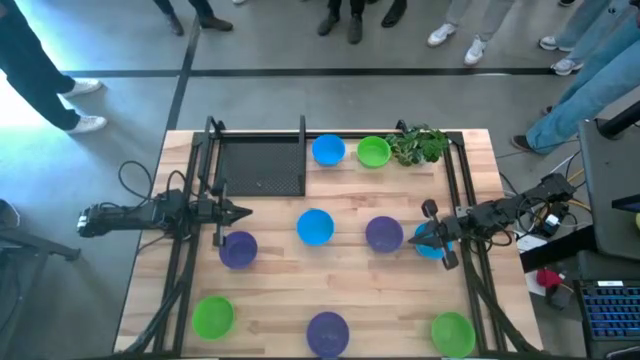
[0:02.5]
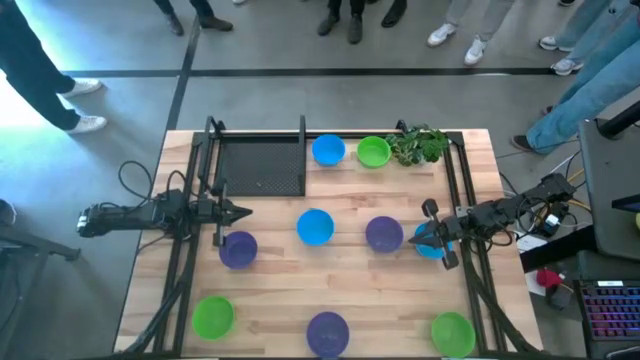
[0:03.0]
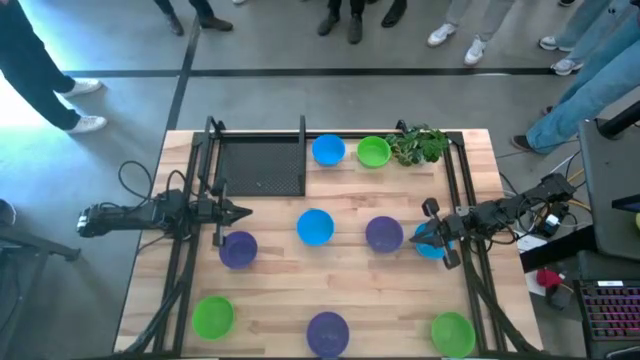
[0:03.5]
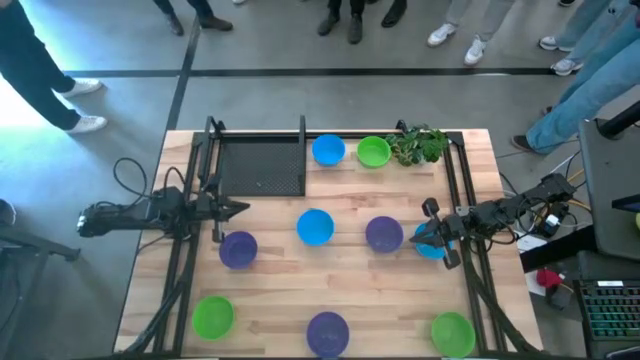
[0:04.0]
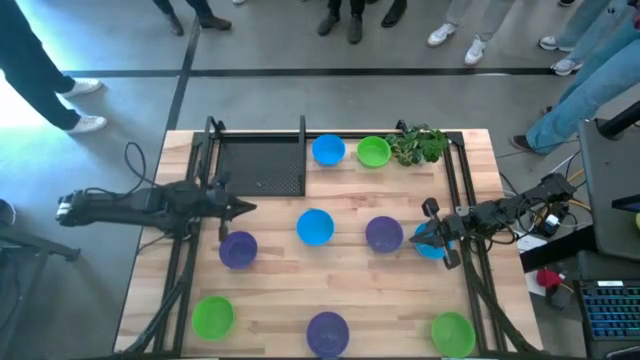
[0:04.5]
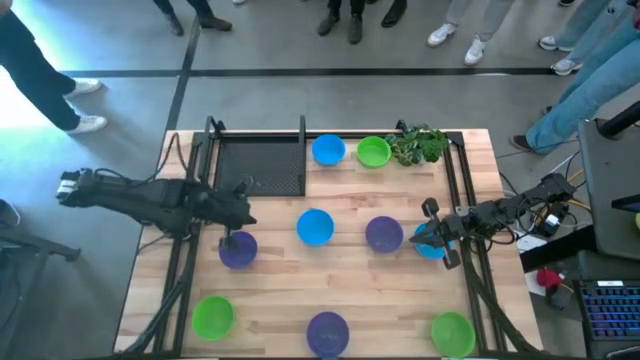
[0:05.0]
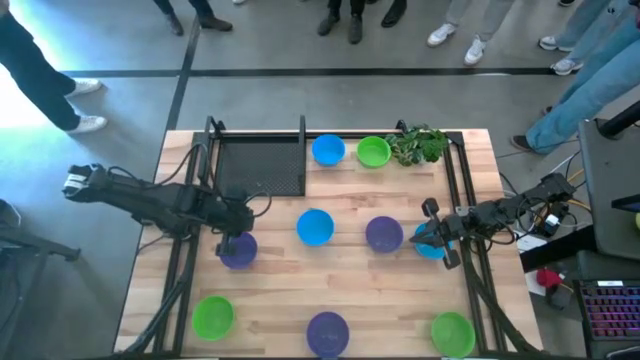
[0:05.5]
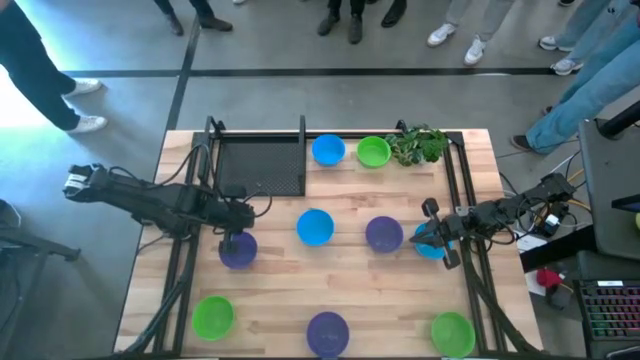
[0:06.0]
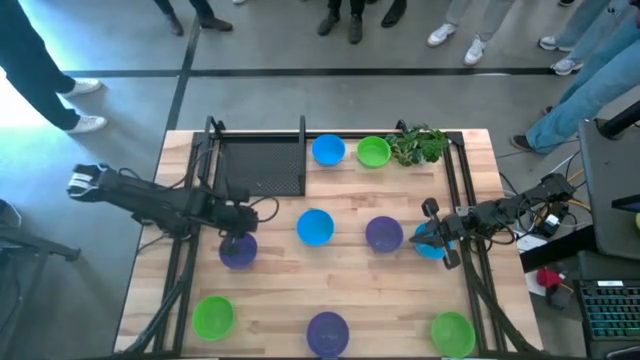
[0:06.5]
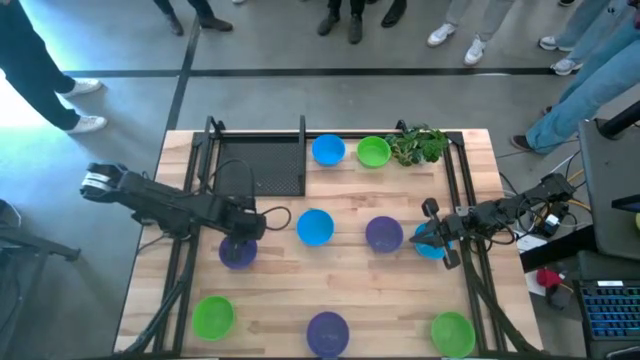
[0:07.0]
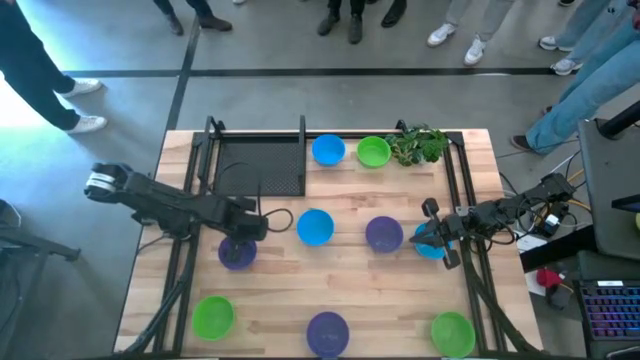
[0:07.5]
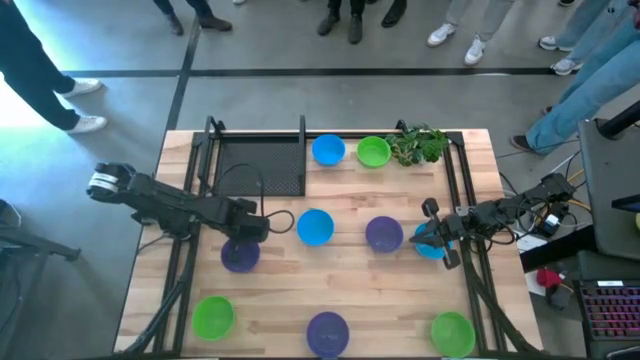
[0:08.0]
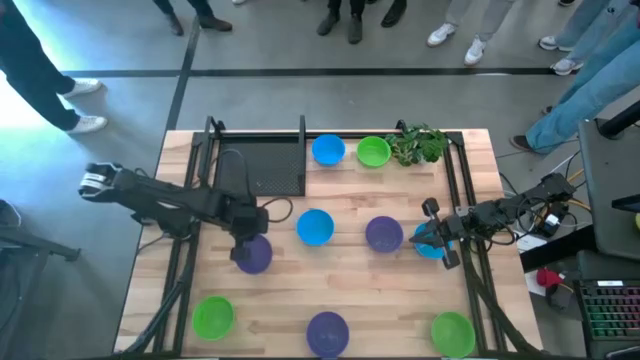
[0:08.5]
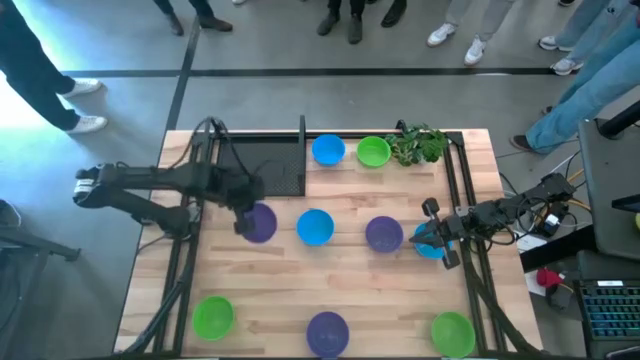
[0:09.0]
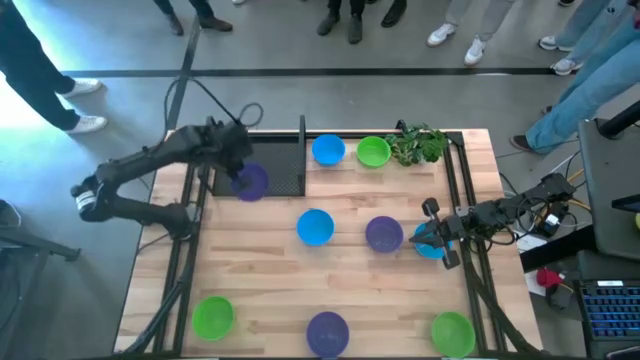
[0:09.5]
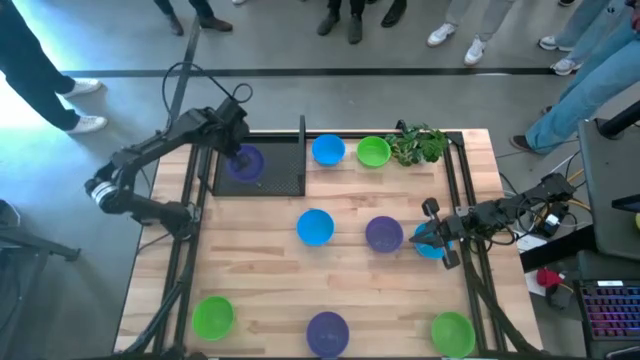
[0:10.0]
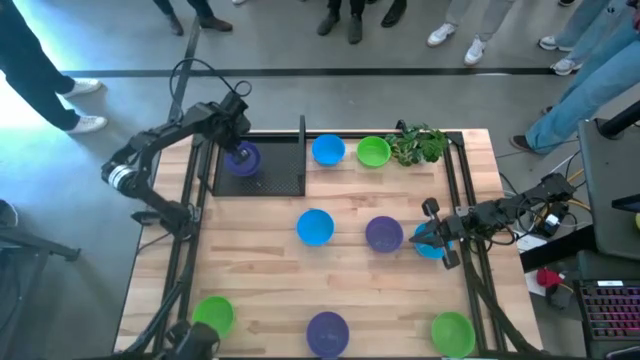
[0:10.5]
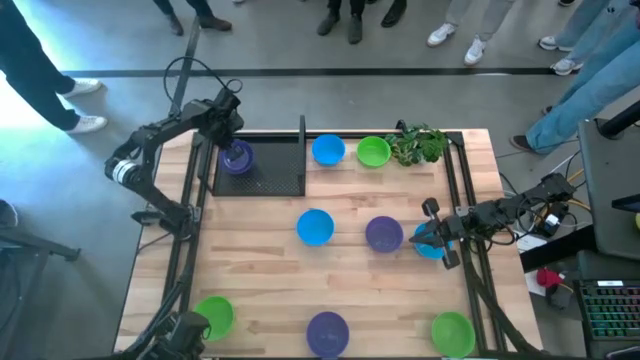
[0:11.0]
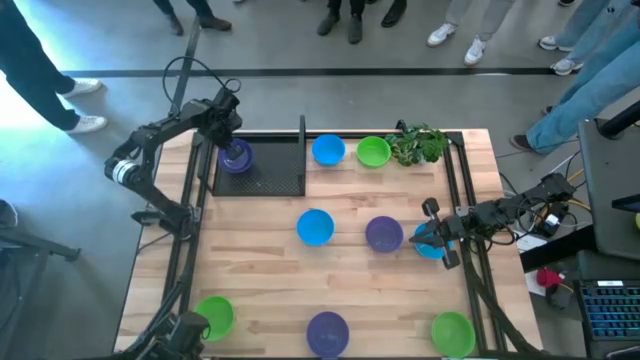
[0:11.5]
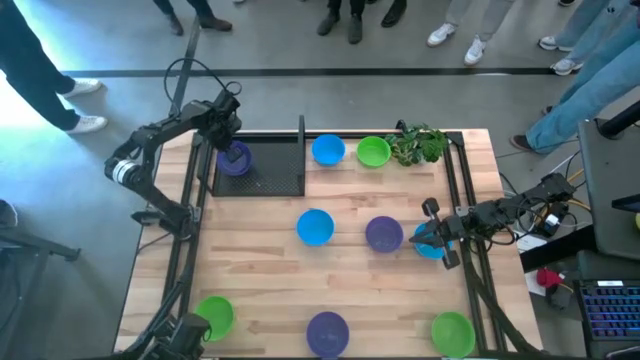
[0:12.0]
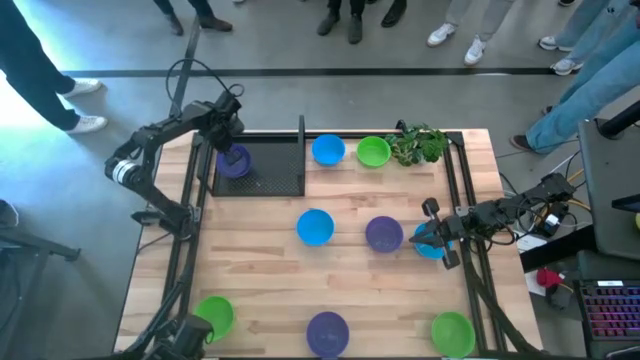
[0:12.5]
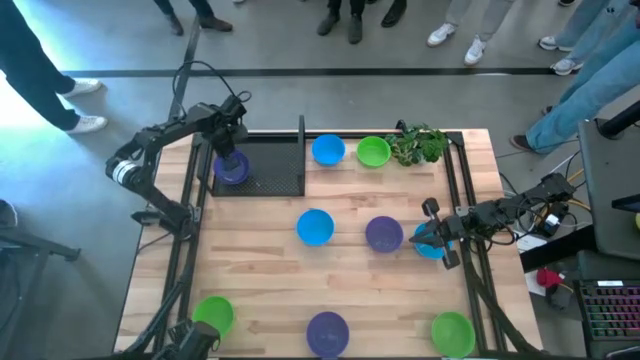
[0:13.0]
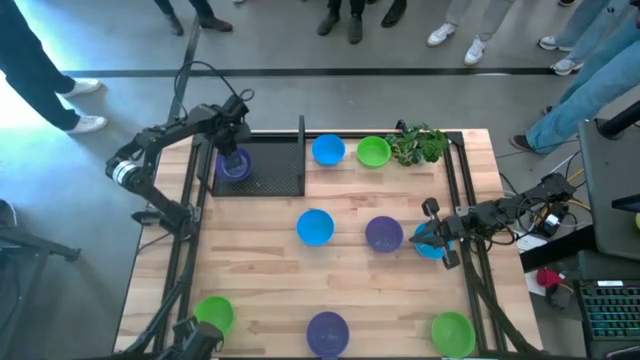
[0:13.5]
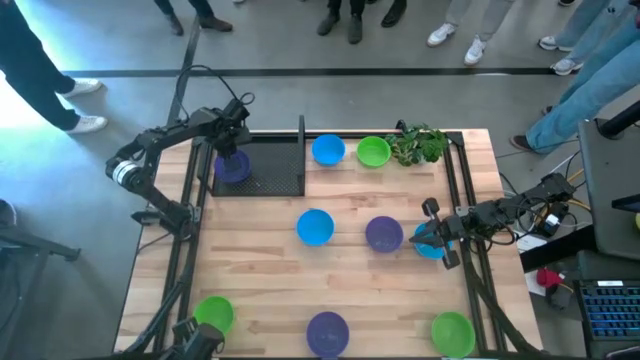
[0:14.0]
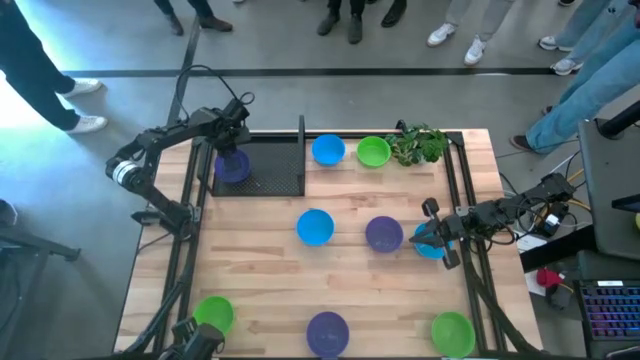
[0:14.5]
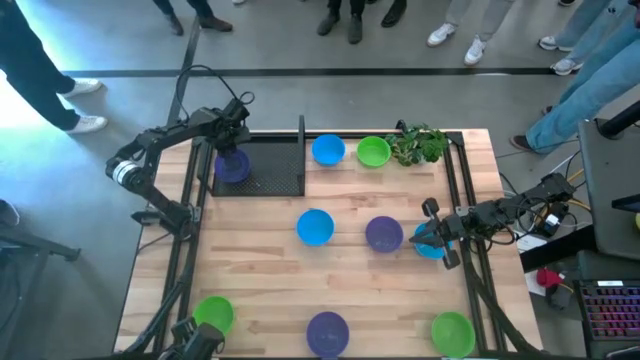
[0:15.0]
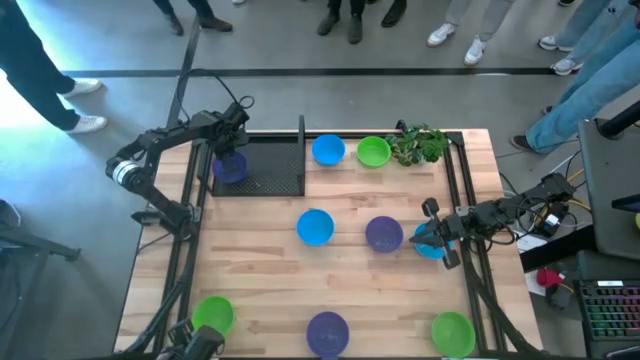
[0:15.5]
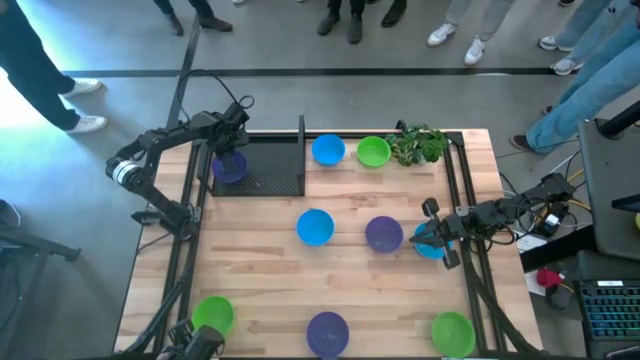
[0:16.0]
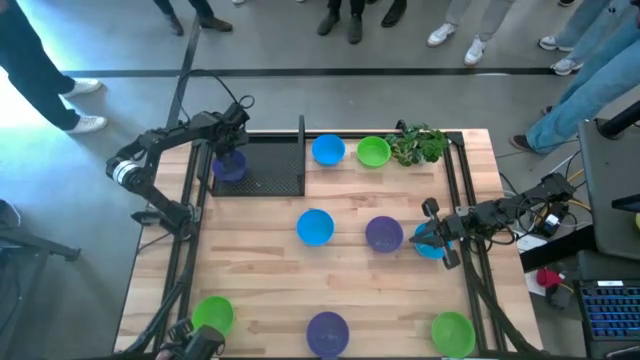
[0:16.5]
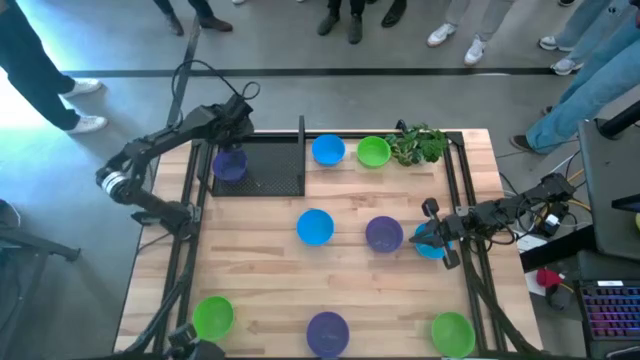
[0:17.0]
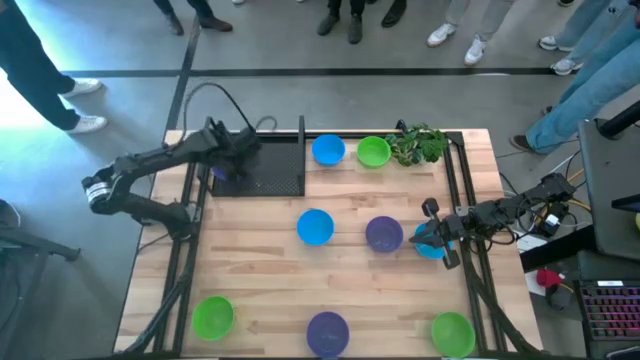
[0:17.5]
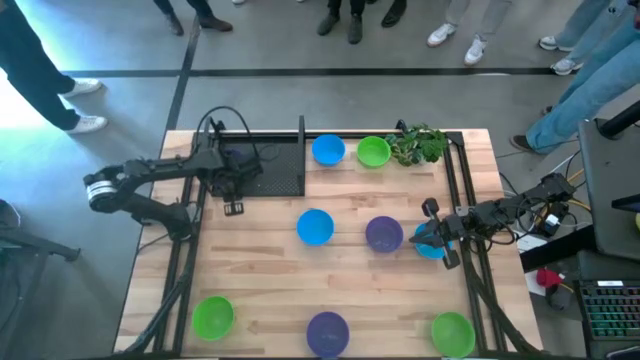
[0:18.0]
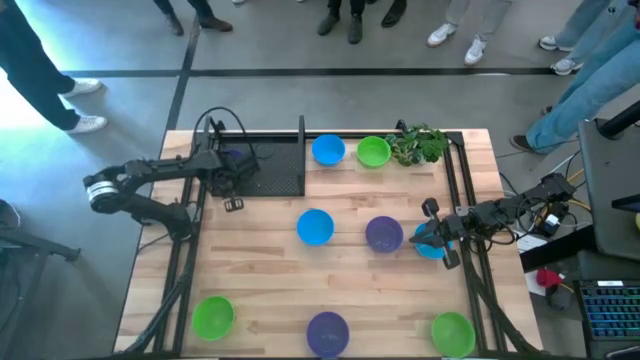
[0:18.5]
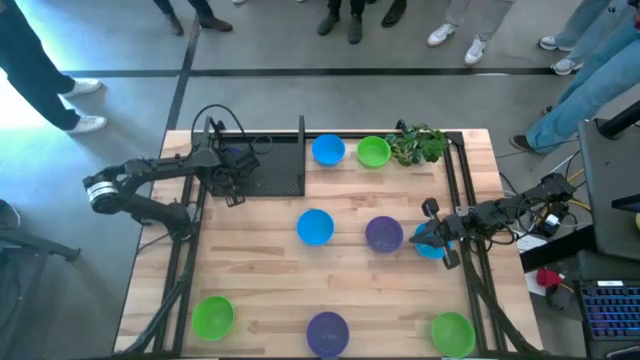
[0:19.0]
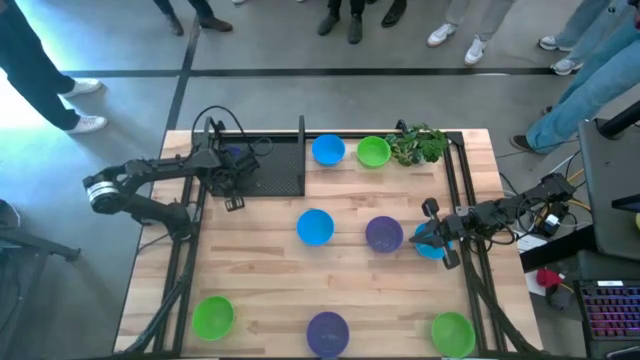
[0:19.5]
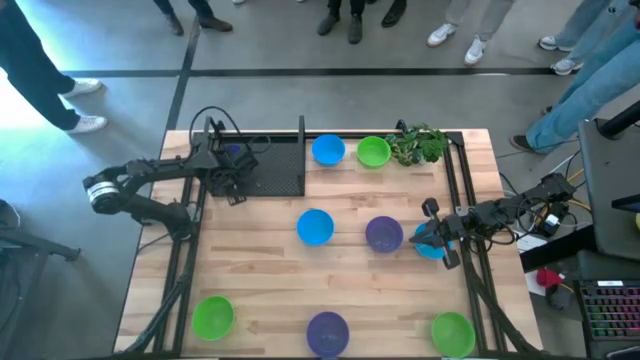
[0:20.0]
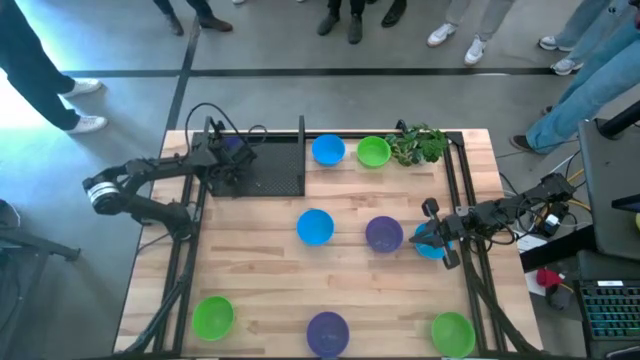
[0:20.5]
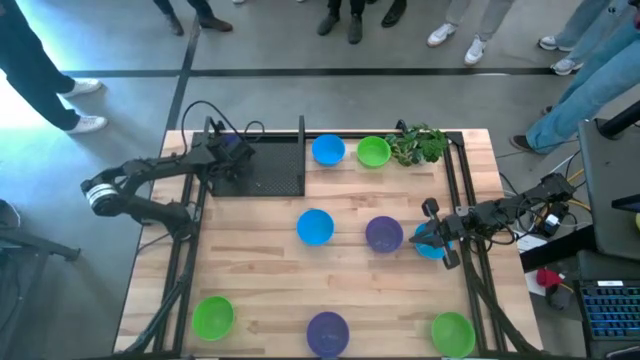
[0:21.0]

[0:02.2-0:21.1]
Task: Pick & Place Mini bowls
Put the top left purple bowl on the shelf
